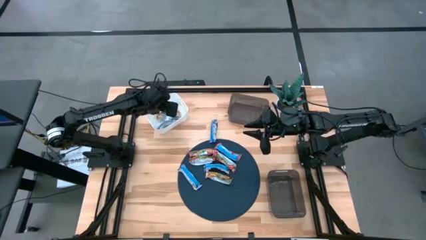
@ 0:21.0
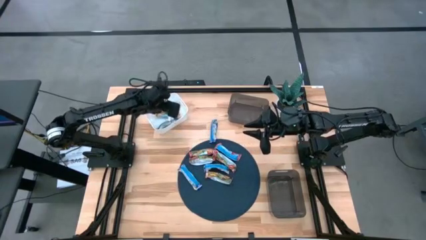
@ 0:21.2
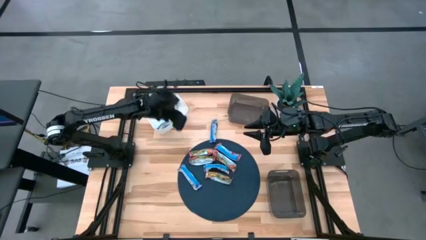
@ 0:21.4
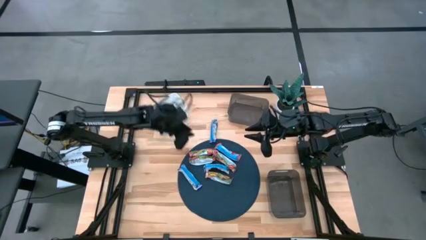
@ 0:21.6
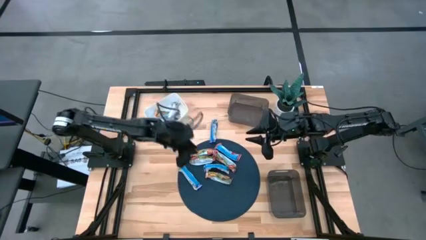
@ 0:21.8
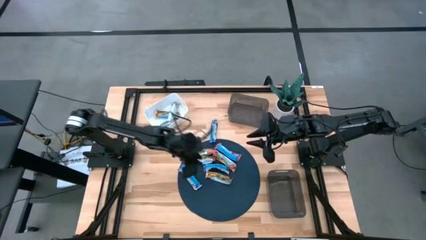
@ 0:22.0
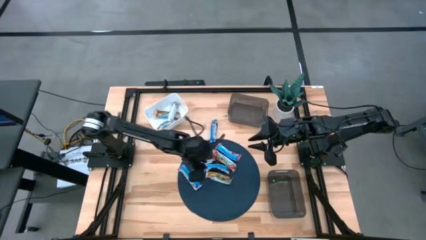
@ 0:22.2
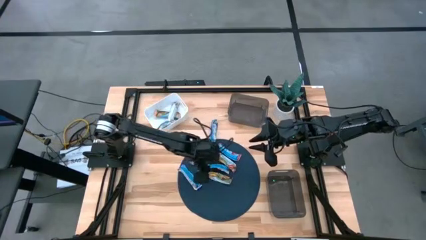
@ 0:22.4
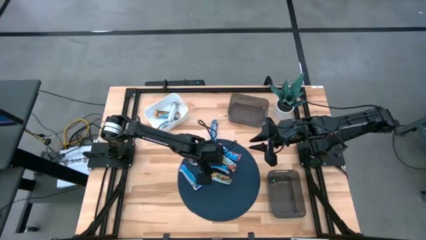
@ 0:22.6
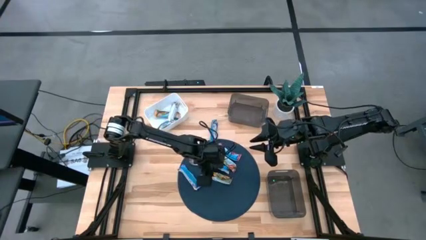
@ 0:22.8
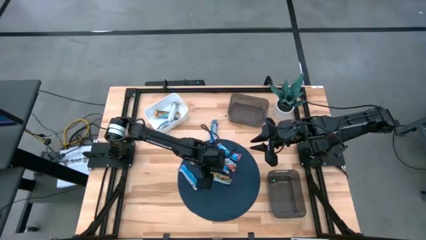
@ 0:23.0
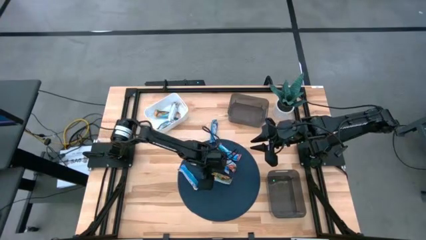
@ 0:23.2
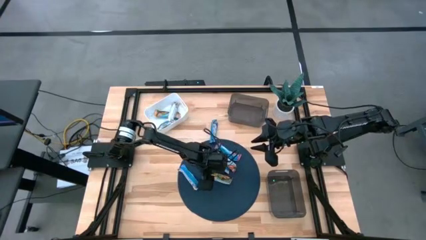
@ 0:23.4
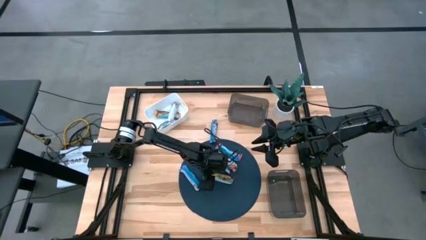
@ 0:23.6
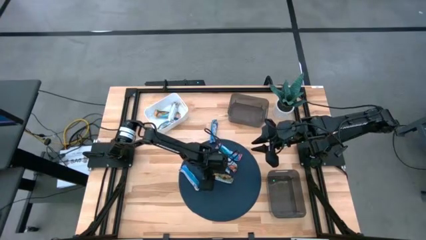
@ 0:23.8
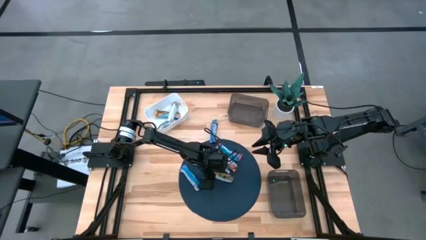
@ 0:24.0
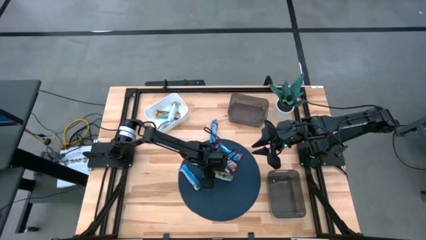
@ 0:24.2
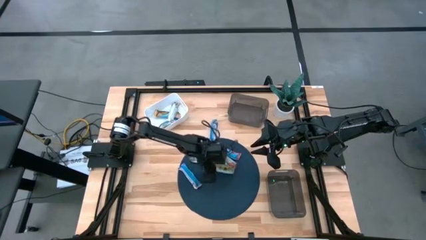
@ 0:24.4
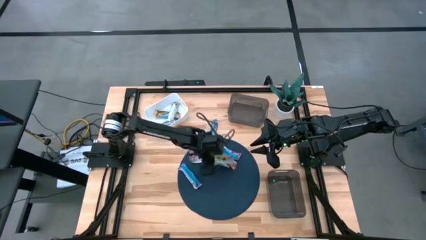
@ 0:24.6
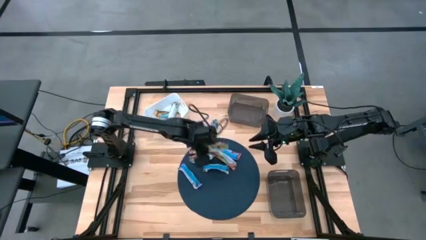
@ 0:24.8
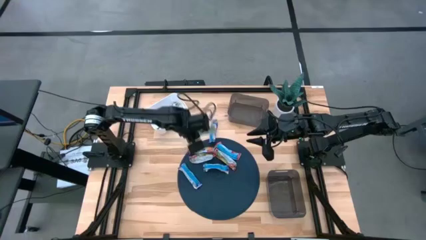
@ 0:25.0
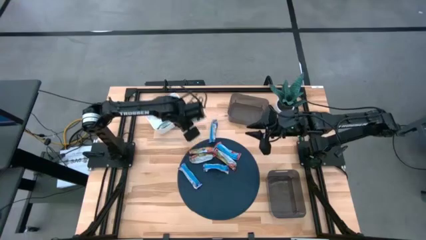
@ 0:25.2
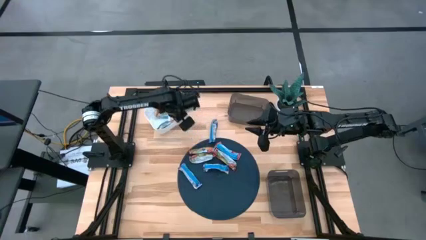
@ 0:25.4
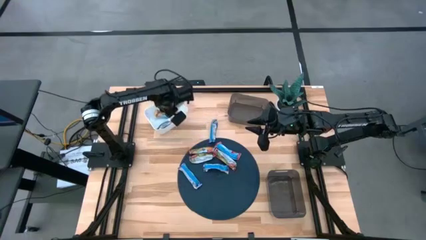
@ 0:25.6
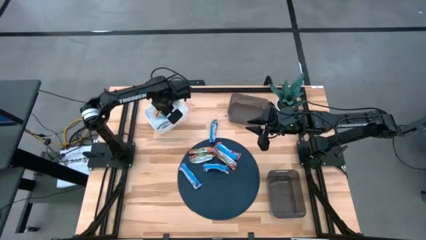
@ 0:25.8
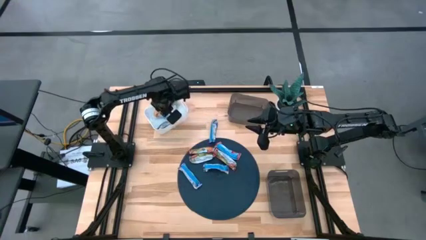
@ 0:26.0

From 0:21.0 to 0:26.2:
Task: Pick and place Granola Bars by type
Put the orange granola bar into the white bin

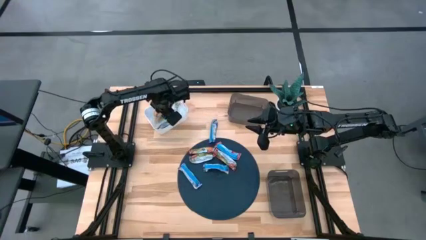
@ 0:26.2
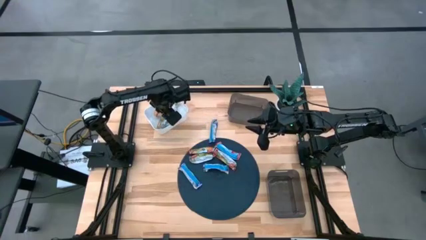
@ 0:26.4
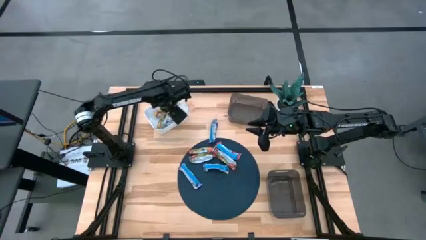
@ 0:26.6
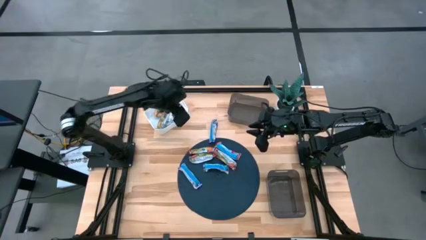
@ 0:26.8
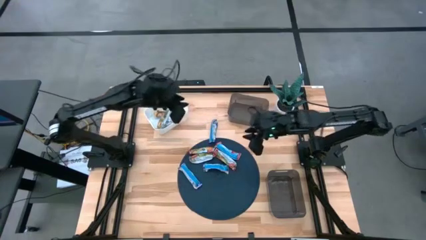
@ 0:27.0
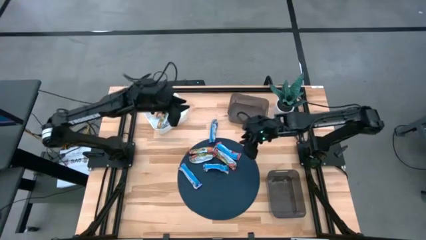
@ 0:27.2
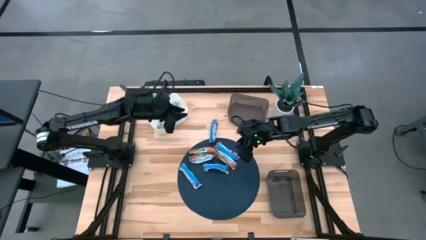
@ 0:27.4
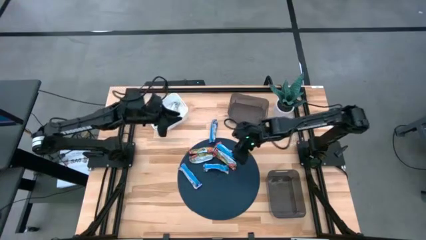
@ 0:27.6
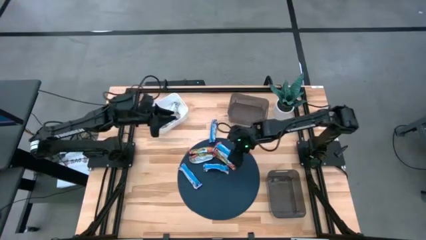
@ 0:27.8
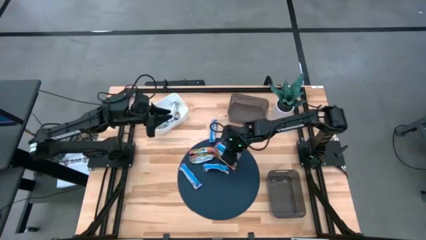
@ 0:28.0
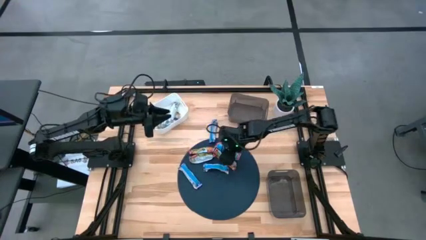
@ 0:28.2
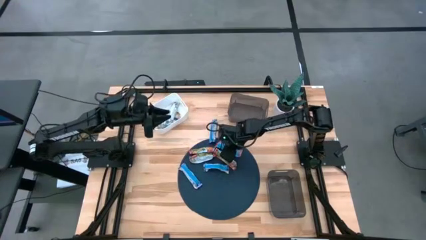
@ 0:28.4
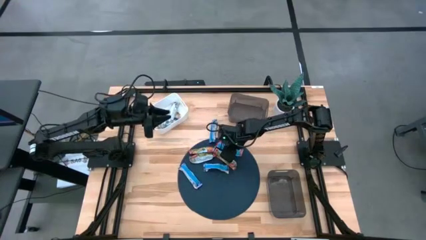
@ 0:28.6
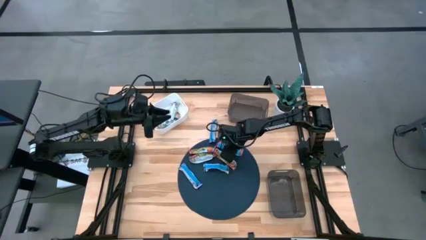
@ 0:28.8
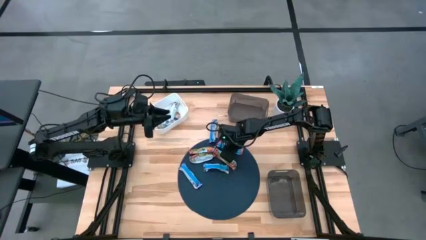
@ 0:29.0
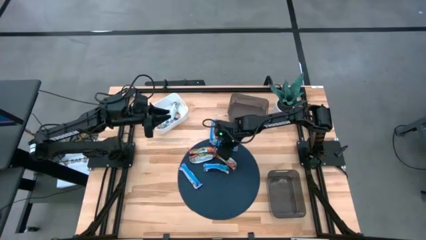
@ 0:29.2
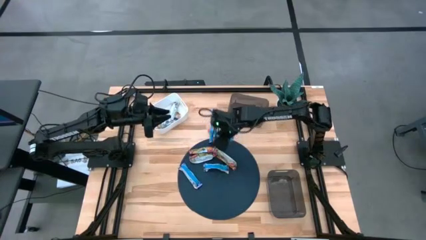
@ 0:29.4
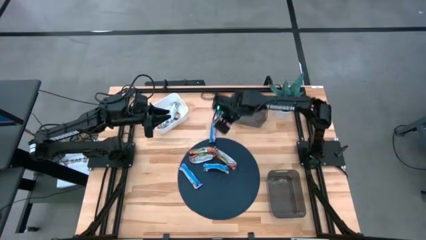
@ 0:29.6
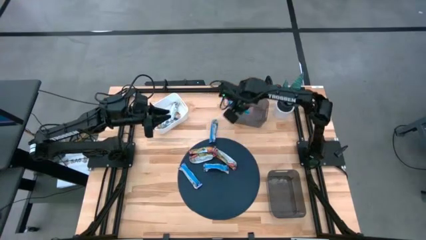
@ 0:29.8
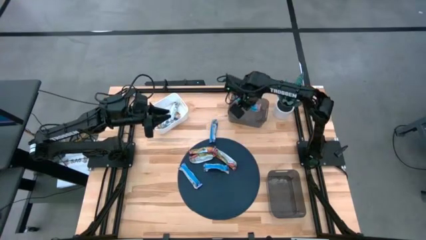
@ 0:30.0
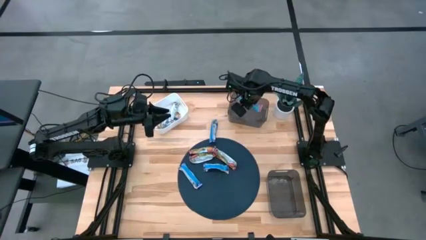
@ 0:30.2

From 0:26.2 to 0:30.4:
Put the red granola bar into the top black bin

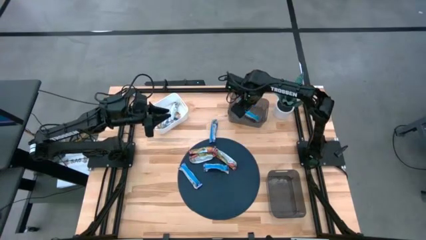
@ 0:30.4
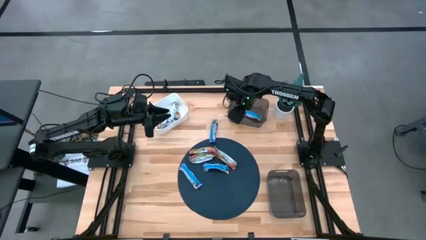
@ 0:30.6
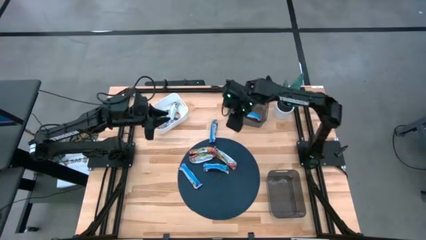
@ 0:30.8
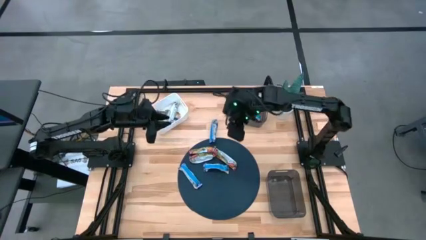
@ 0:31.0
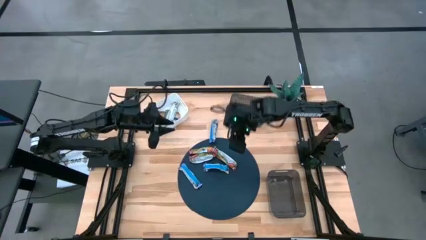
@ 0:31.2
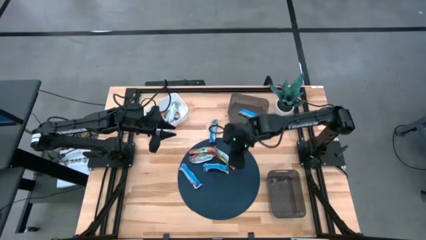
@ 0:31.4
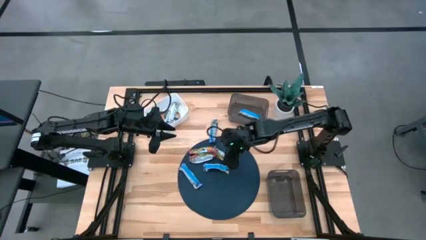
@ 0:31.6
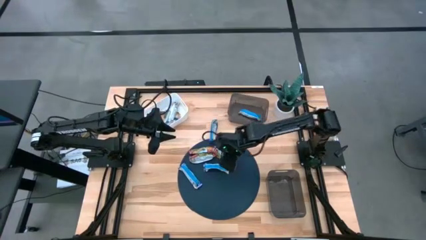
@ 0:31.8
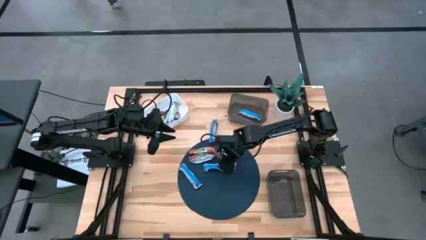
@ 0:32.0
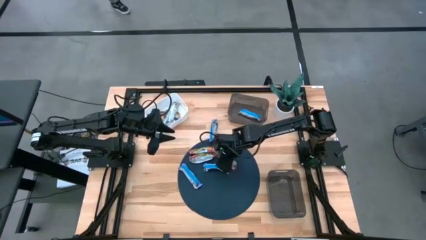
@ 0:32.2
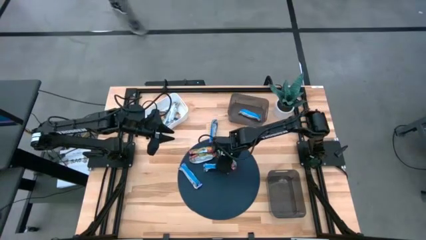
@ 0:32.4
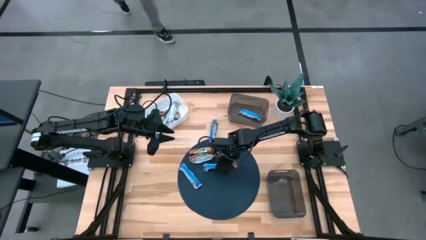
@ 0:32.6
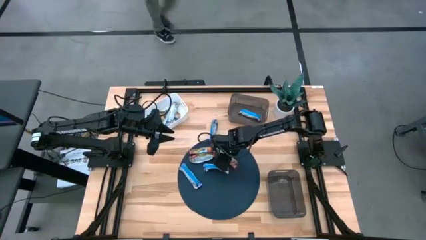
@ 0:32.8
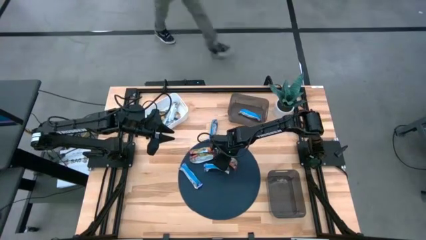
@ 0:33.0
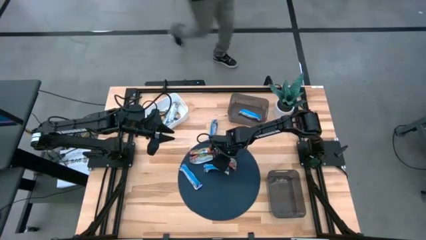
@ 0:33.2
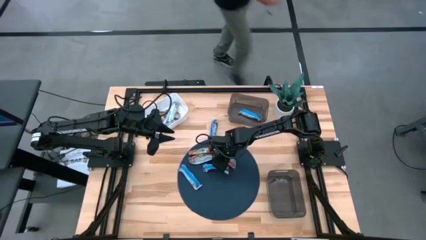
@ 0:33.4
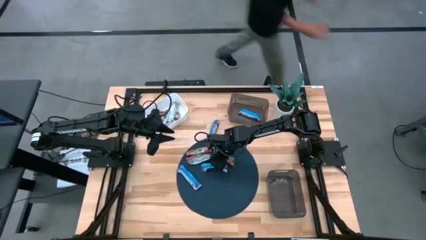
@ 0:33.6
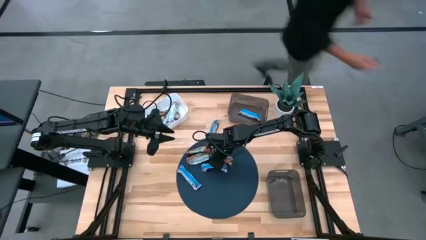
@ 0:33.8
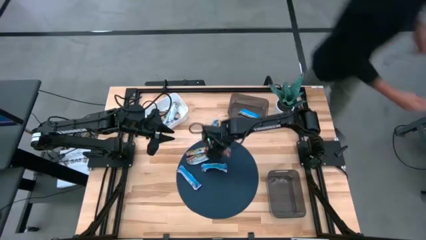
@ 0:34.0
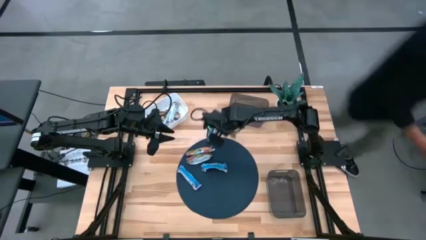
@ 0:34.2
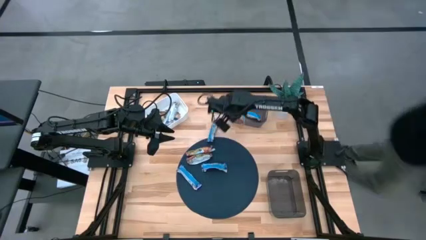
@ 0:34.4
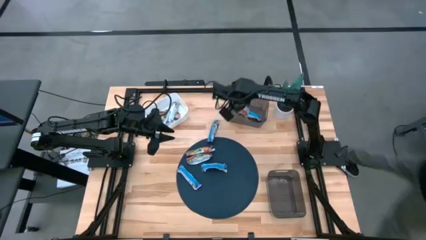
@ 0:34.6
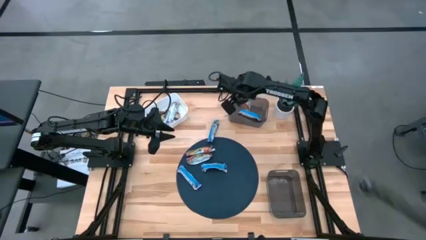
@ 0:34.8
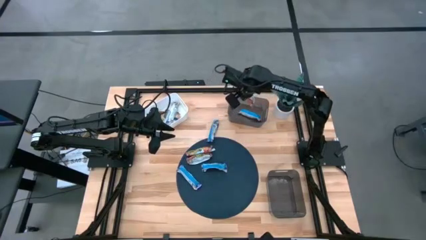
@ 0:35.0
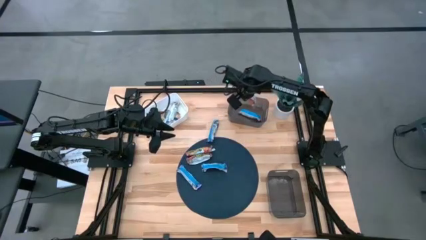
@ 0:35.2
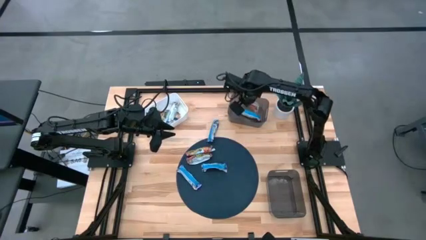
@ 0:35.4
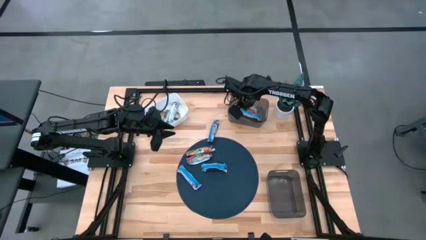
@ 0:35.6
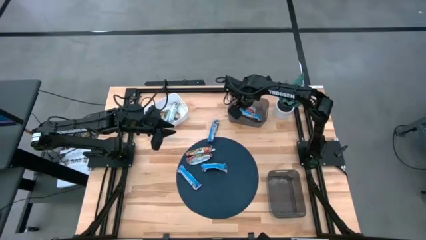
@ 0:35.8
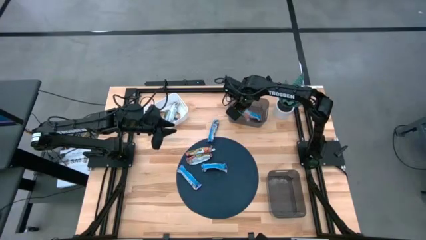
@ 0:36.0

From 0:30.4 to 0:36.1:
Put the red granola bar into the top black bin
